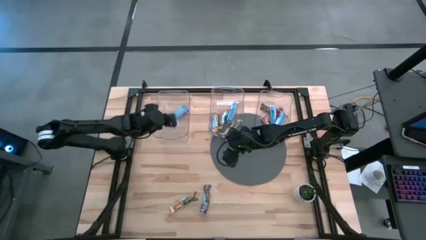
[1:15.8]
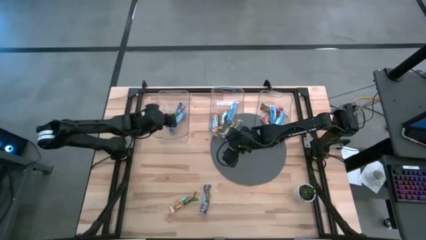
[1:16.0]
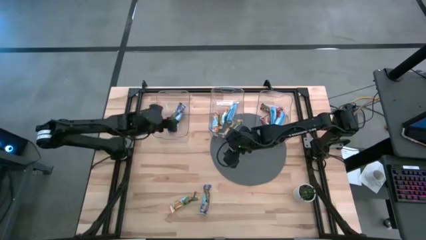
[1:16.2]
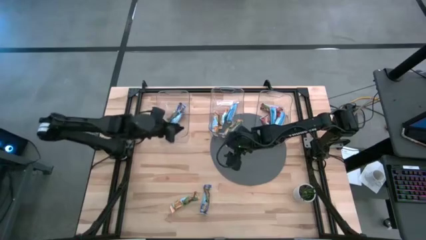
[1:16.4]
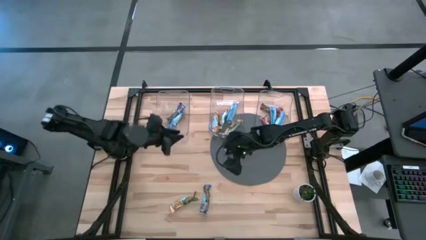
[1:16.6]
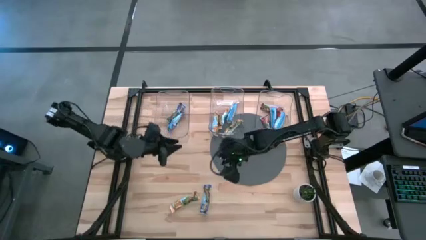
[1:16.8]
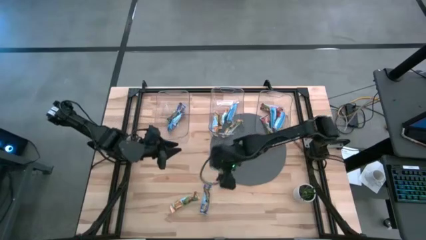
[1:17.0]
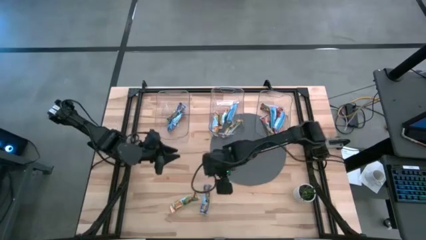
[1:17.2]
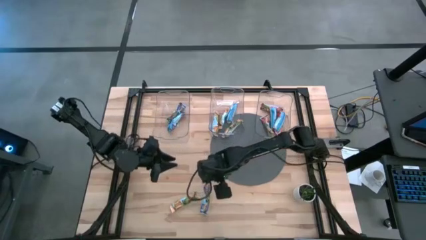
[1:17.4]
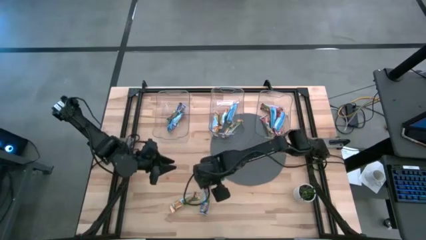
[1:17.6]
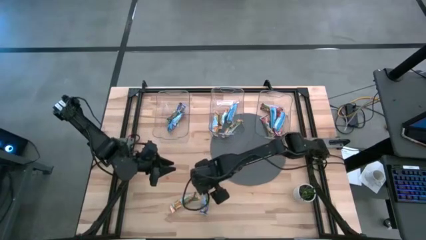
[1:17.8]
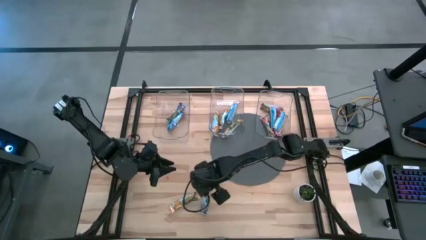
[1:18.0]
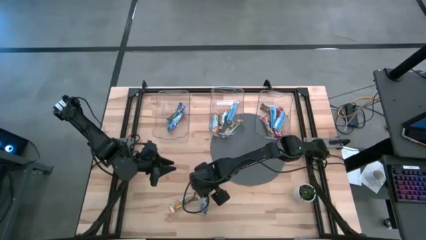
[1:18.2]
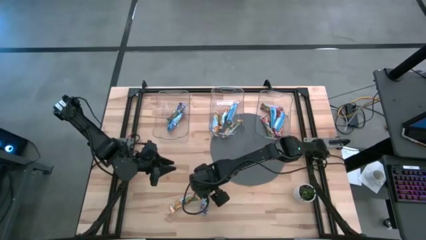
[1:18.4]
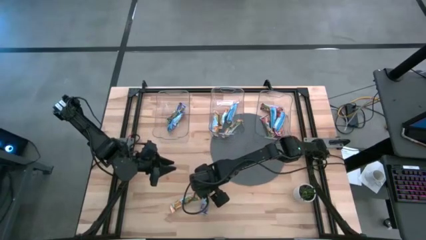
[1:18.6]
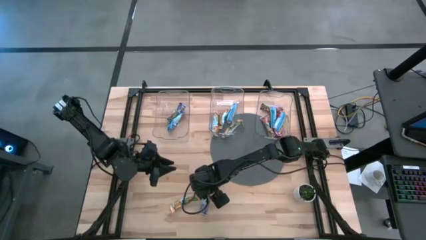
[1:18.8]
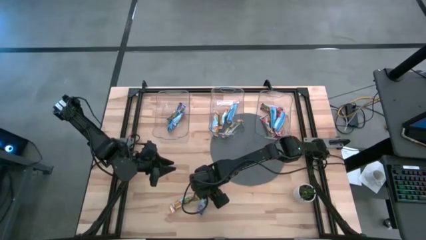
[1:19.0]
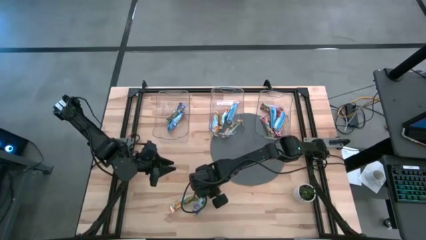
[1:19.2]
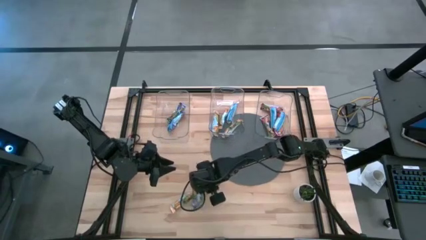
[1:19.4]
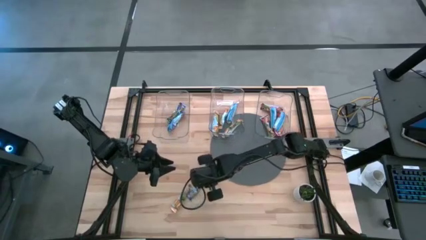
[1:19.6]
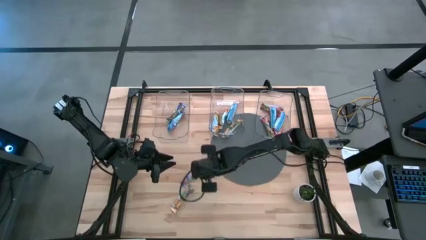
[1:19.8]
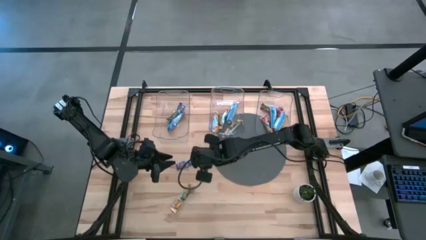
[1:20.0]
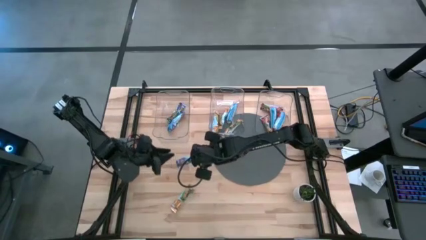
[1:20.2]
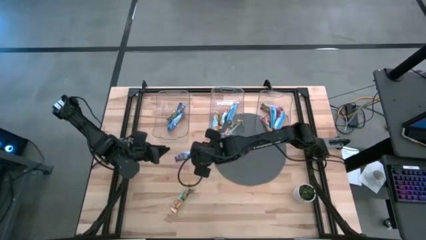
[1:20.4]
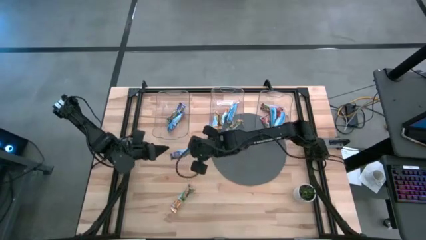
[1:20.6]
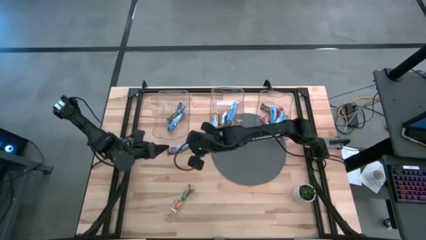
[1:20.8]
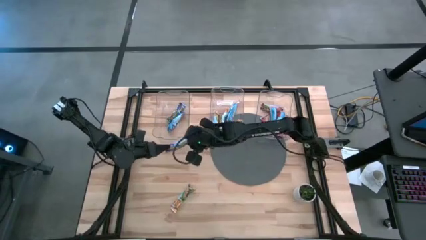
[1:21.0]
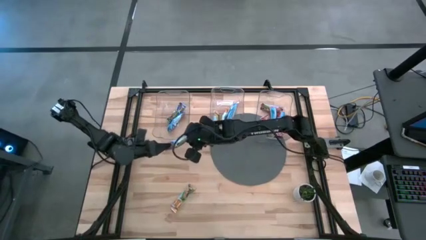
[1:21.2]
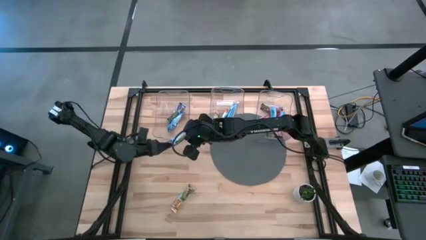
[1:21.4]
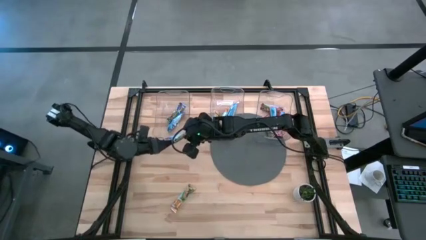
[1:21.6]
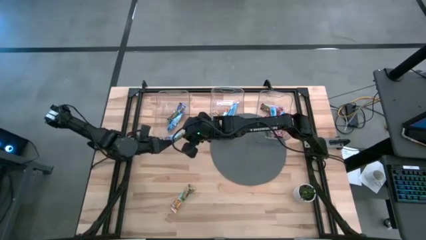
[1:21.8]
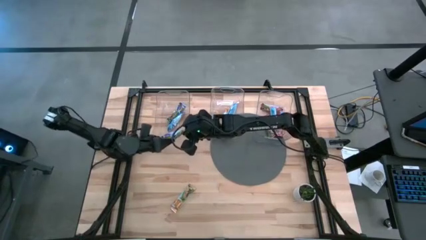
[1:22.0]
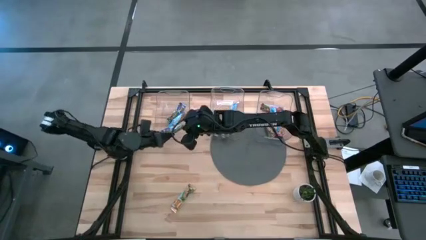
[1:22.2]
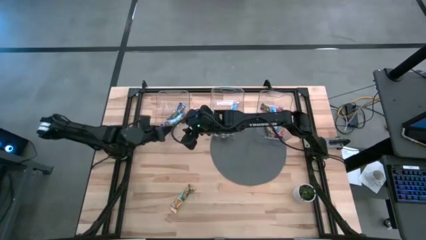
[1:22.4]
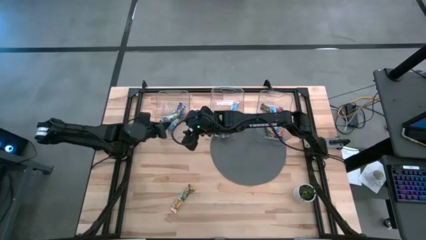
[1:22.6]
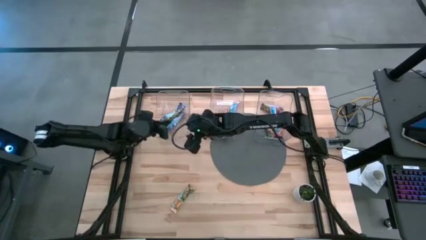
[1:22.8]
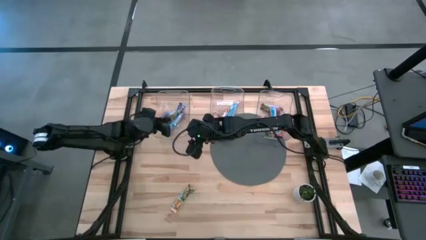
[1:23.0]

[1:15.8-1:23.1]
Task: Pick and place Granola Bars by type
Put the blue granola bar into the left transparent bin

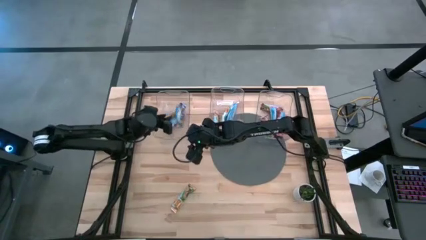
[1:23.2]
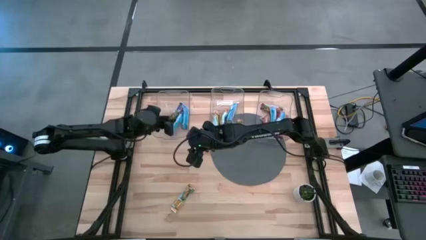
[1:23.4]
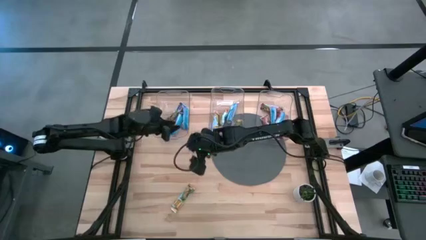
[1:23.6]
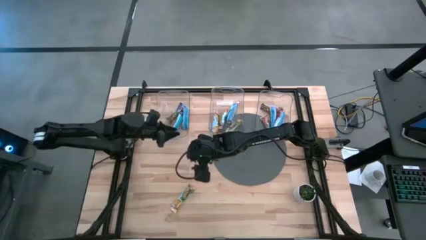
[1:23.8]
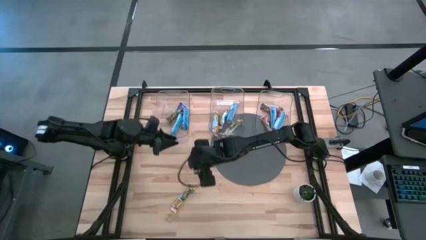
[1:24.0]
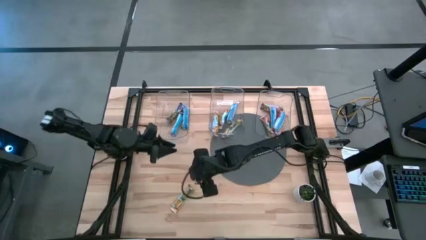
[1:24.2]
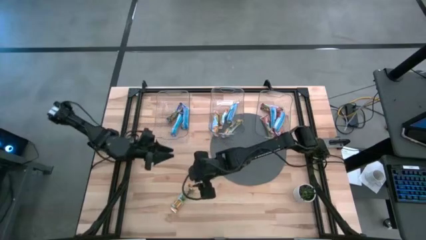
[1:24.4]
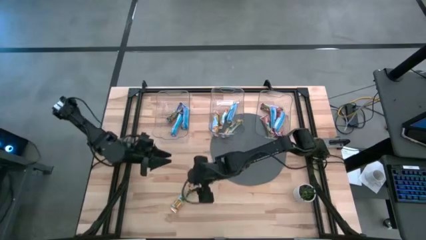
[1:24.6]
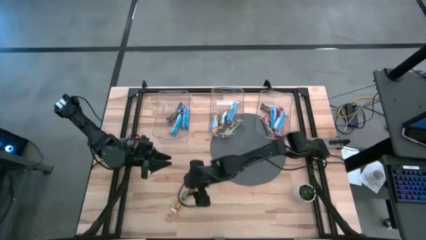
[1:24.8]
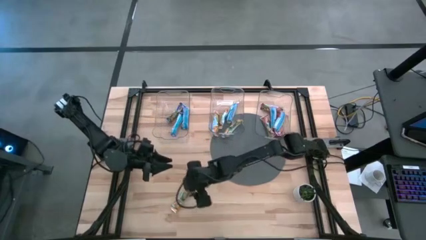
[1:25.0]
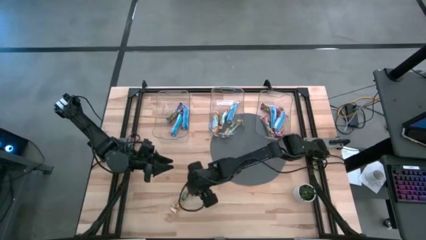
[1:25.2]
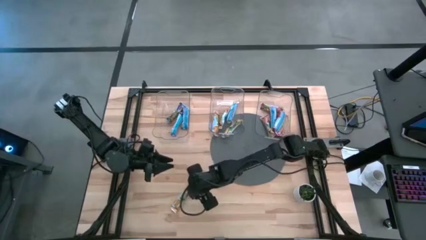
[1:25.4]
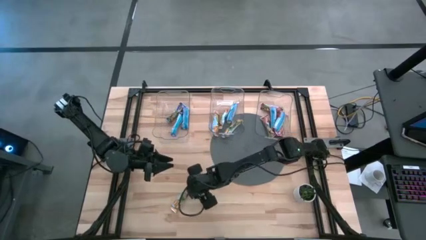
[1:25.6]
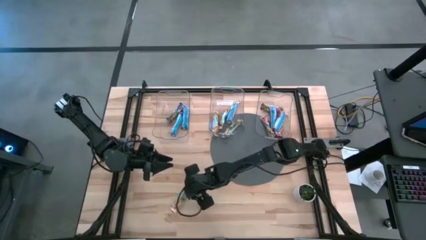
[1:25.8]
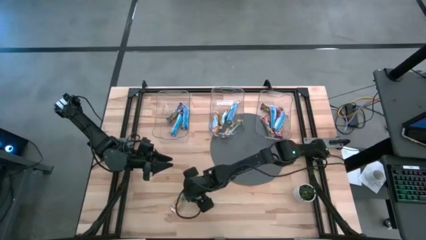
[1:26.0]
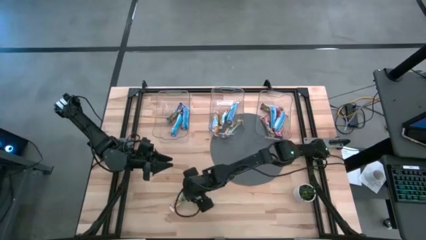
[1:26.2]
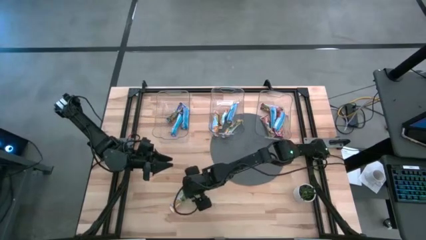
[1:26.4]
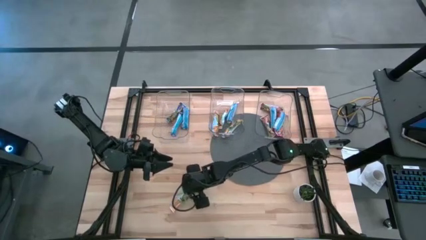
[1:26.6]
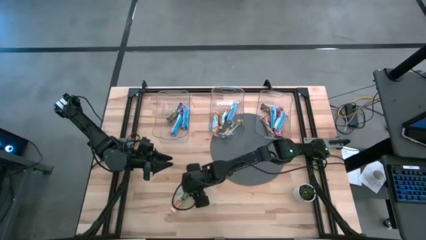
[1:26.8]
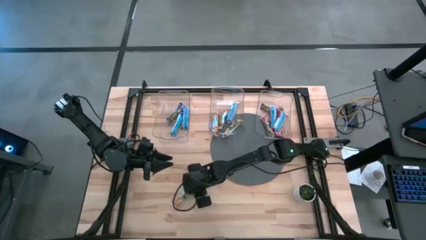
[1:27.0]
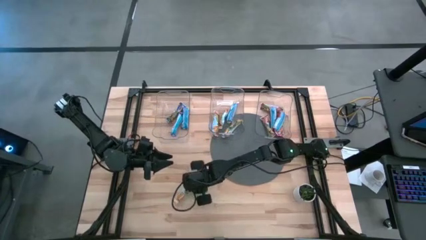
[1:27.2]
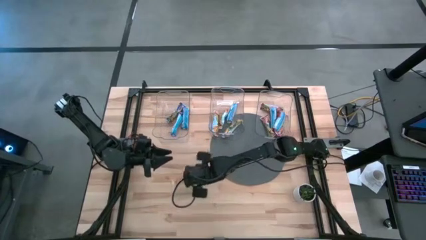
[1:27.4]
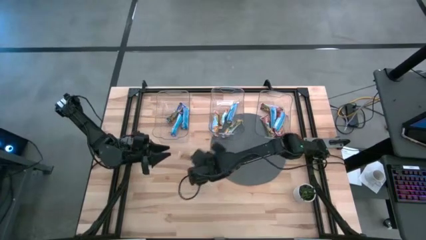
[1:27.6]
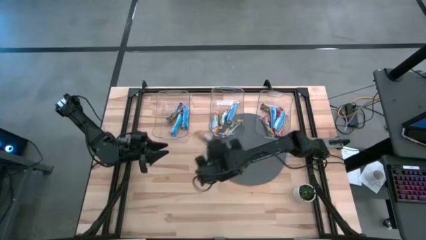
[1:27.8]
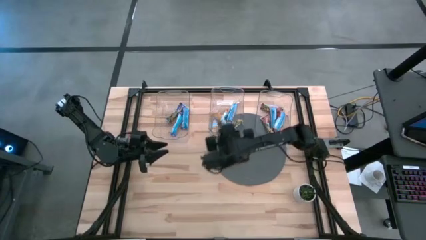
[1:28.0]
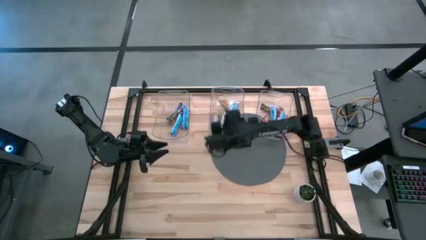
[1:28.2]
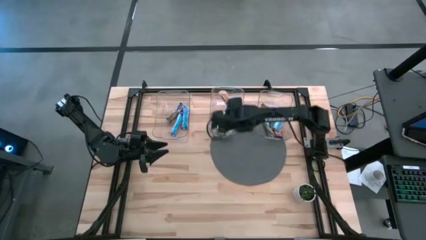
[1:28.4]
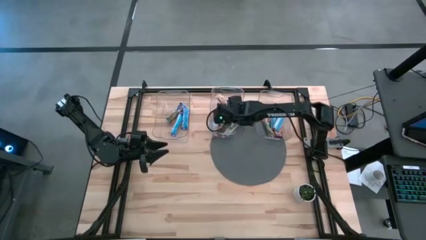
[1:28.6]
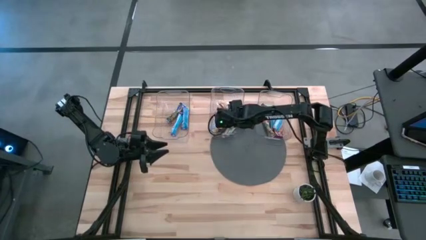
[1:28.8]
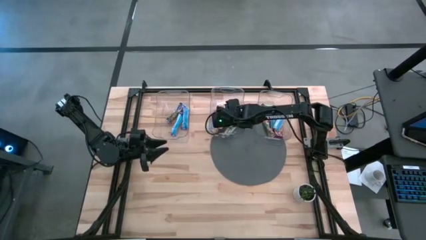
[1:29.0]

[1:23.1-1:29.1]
Put the yellow granola bar into the middle transparent bin

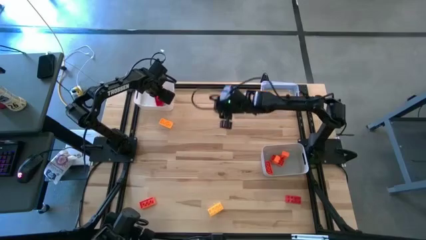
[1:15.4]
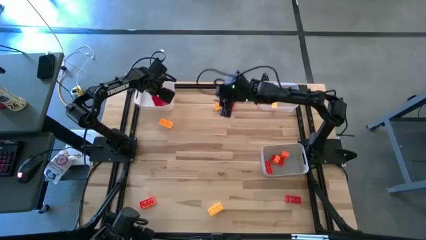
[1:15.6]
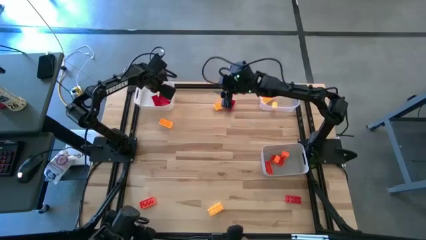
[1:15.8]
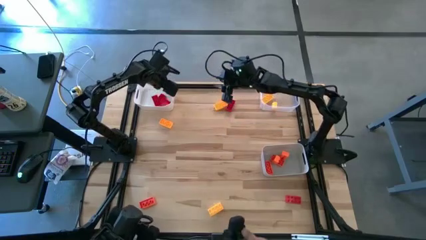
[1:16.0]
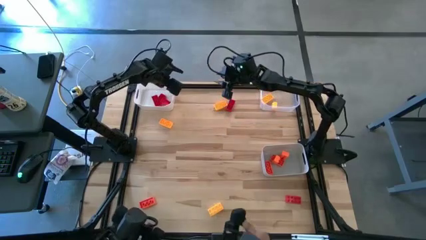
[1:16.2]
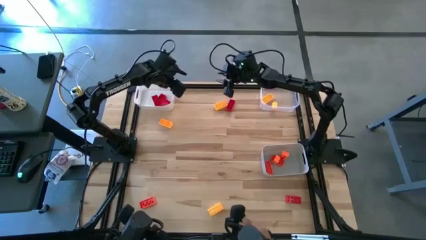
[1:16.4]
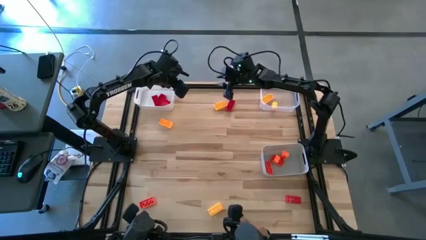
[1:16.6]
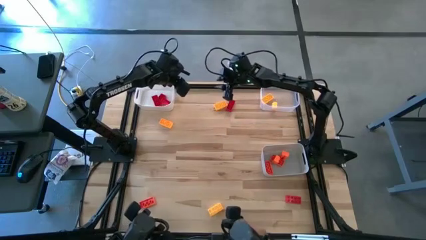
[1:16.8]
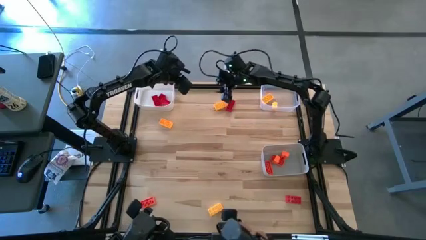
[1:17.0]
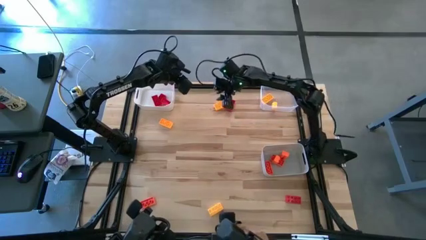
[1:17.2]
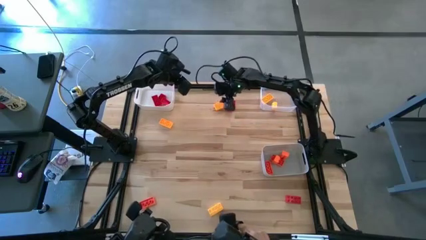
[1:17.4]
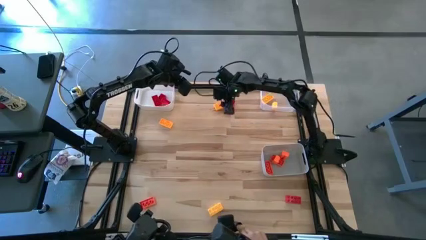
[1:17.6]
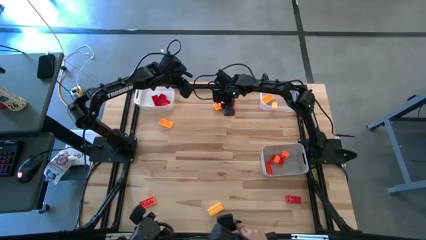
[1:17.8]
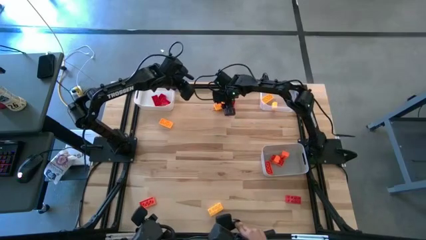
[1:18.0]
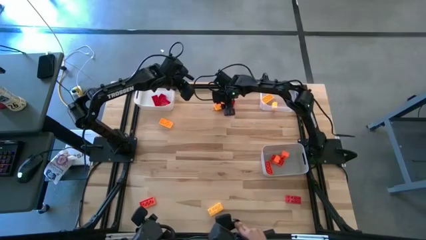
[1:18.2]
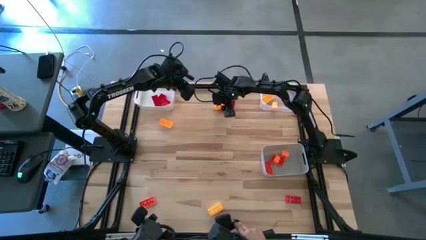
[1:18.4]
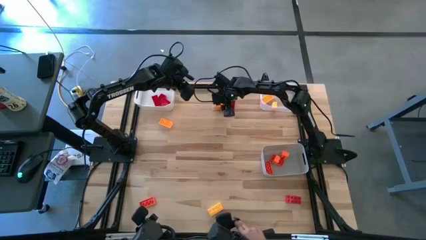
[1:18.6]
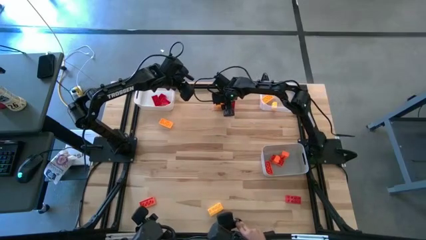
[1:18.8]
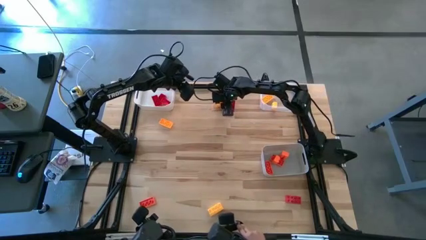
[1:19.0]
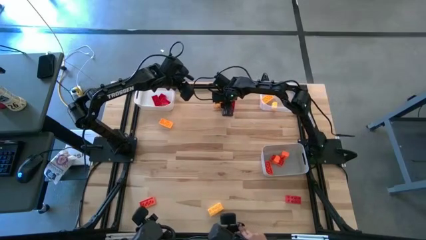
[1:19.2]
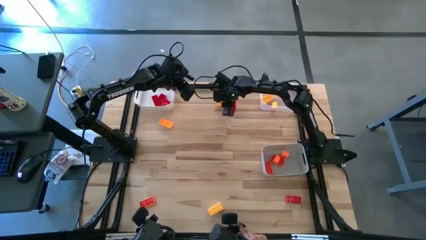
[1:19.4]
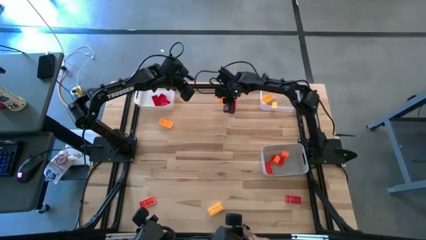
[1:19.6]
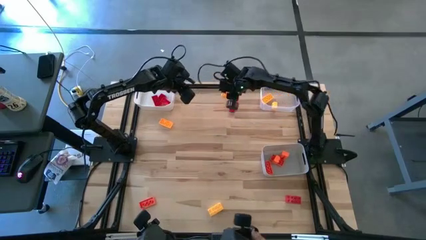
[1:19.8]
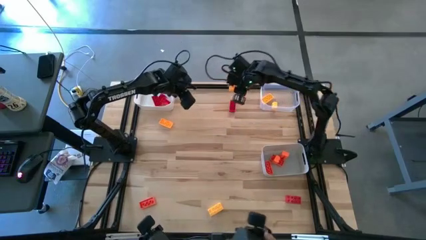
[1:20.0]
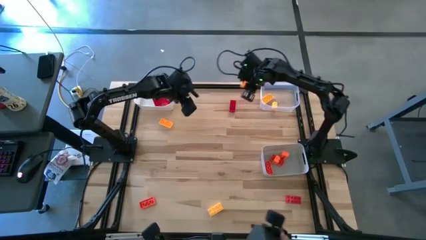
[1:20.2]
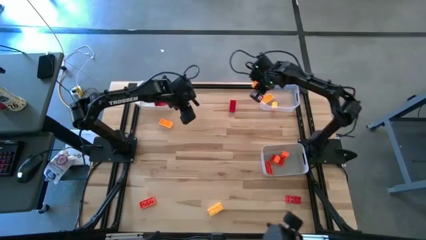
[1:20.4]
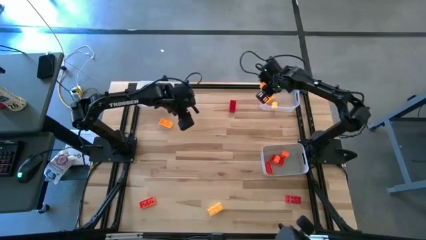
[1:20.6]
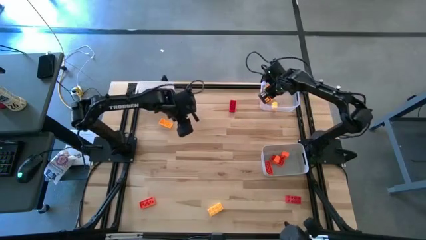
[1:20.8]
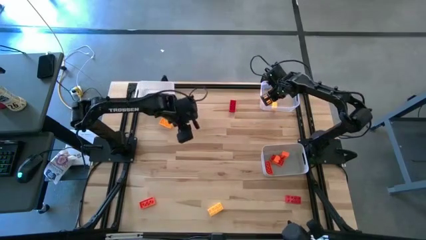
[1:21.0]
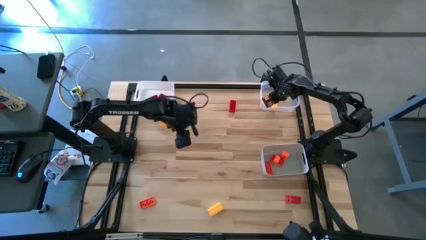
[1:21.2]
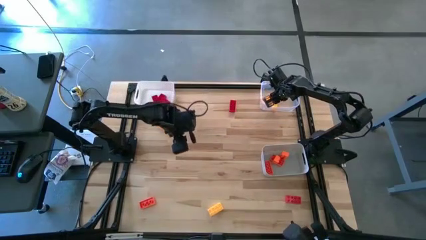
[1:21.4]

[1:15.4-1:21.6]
Task: Sort & place blocks by color
Put the yellow game piece into the transparent bin
